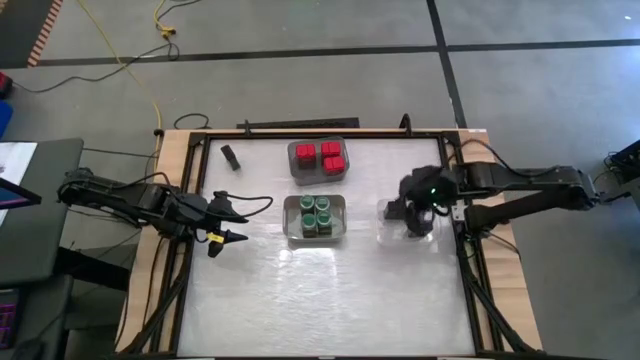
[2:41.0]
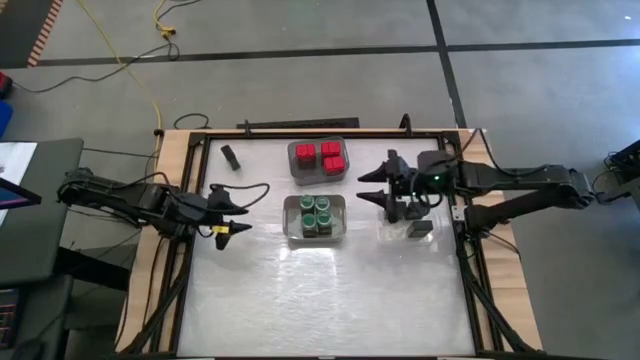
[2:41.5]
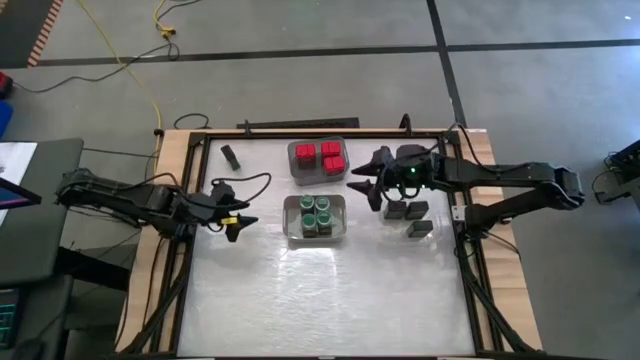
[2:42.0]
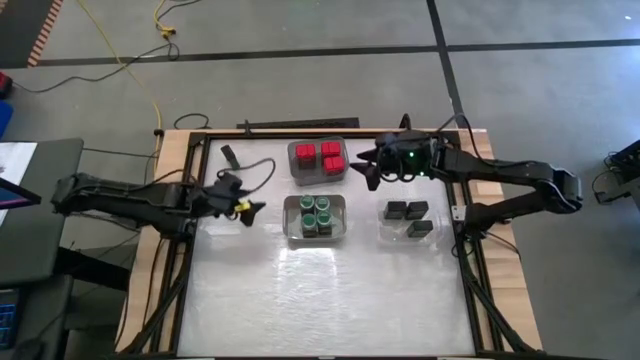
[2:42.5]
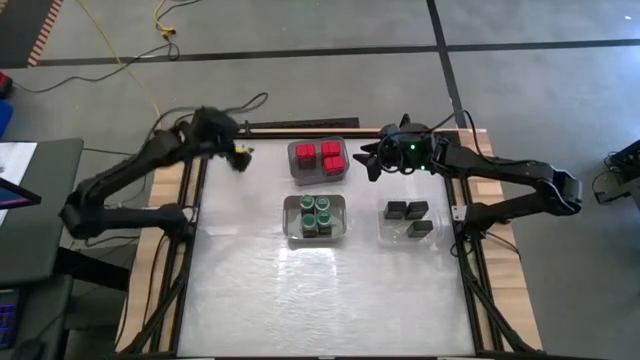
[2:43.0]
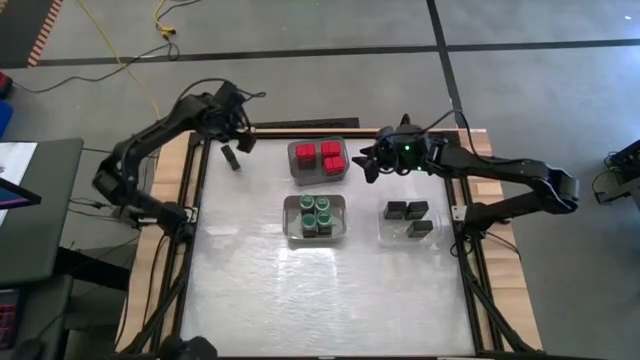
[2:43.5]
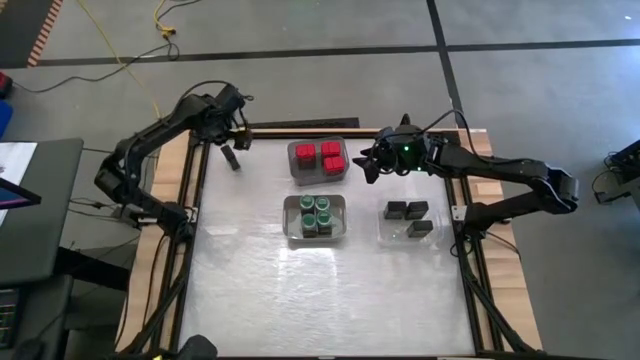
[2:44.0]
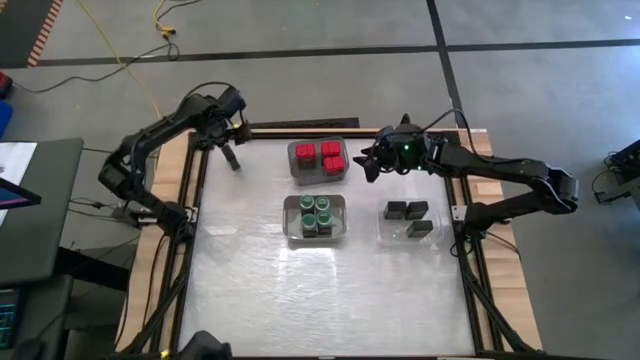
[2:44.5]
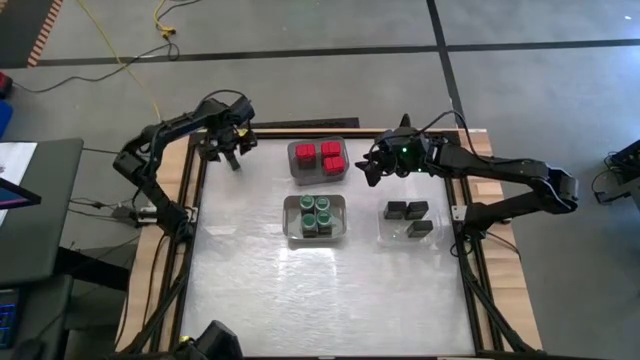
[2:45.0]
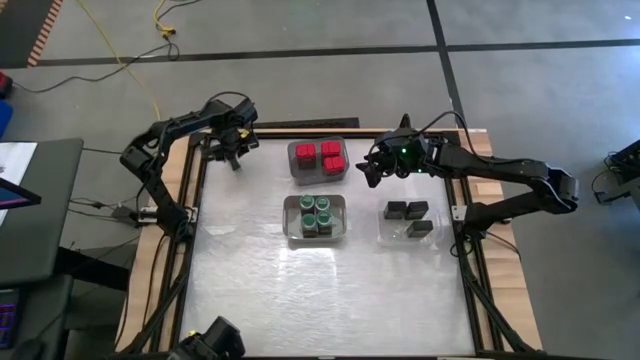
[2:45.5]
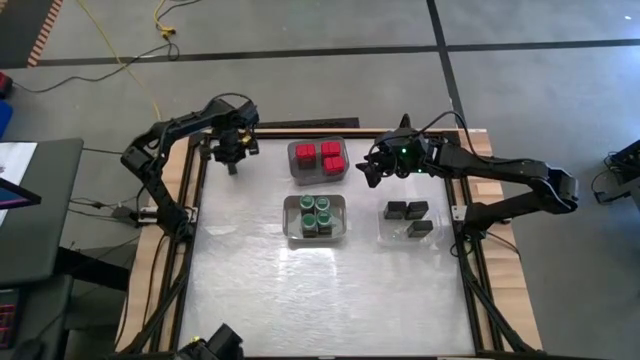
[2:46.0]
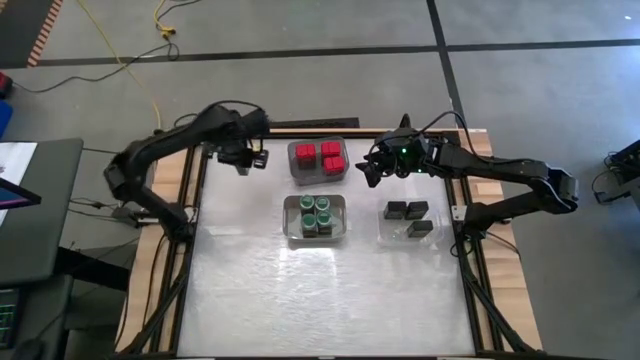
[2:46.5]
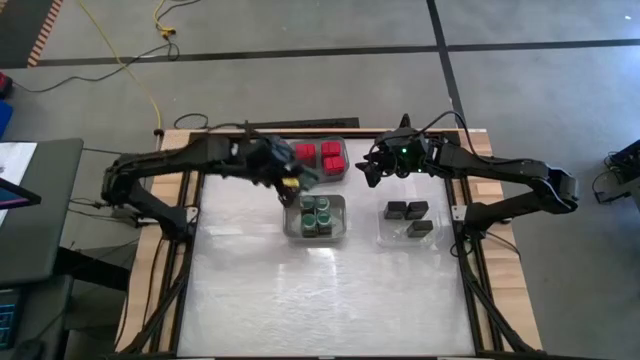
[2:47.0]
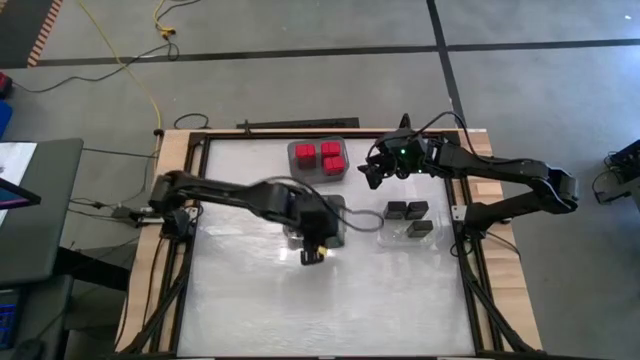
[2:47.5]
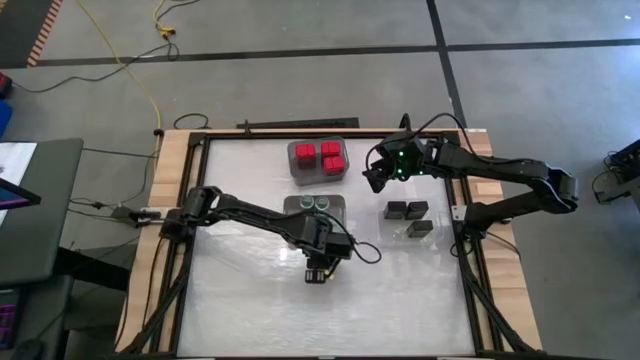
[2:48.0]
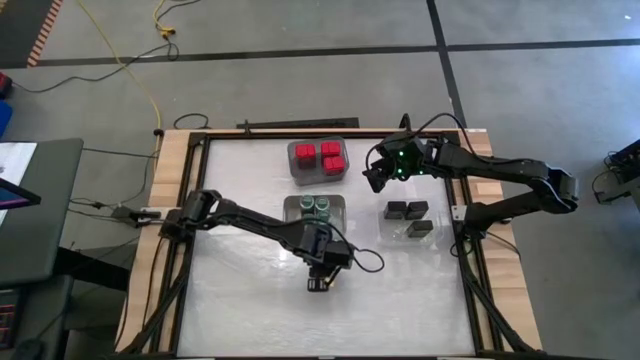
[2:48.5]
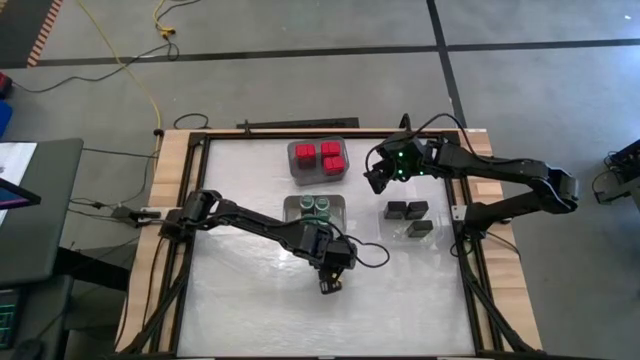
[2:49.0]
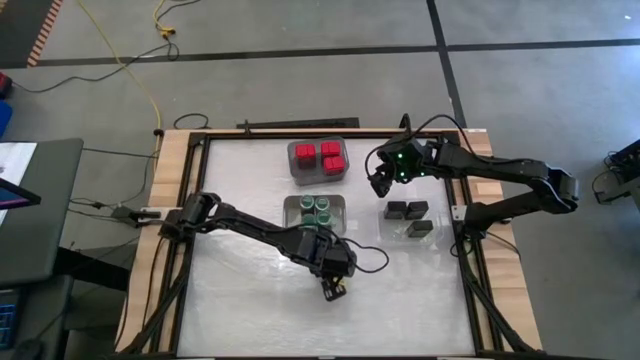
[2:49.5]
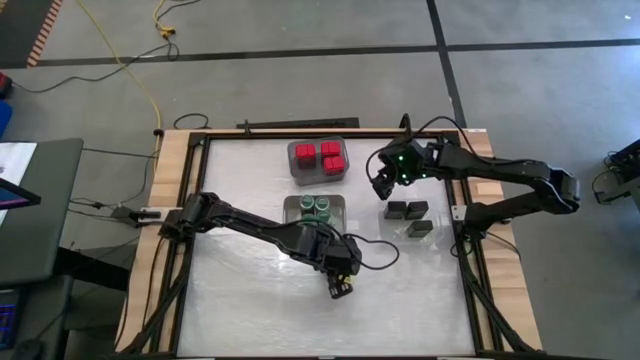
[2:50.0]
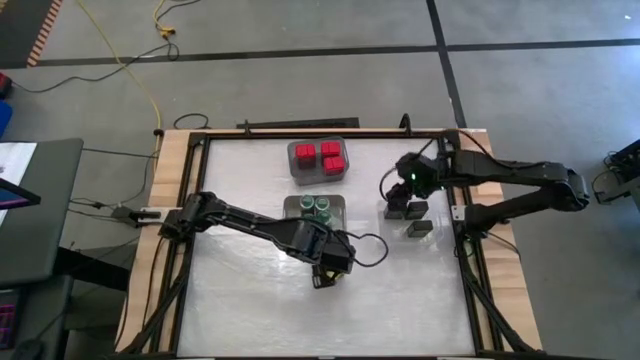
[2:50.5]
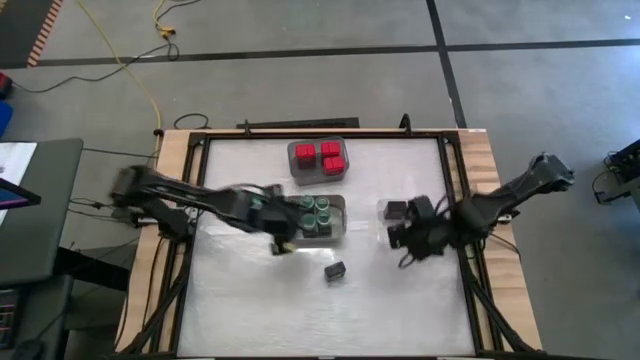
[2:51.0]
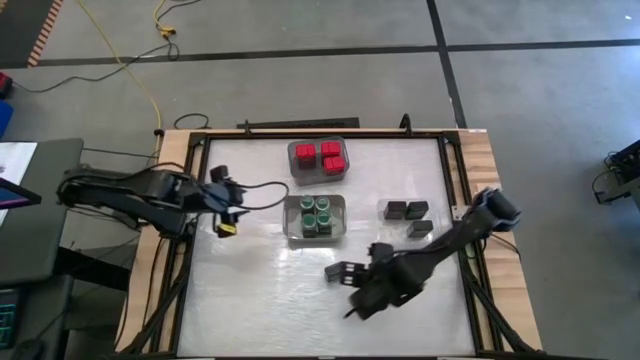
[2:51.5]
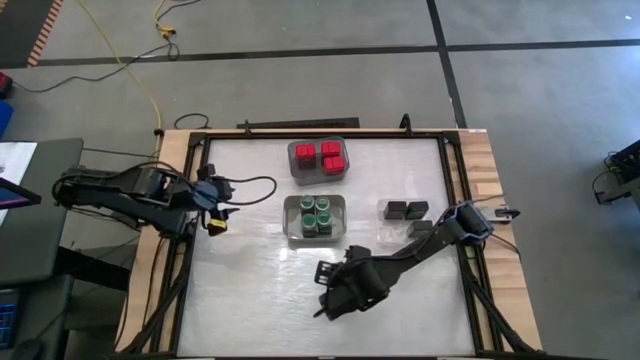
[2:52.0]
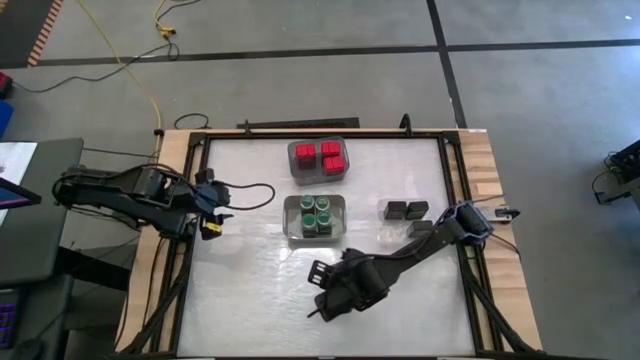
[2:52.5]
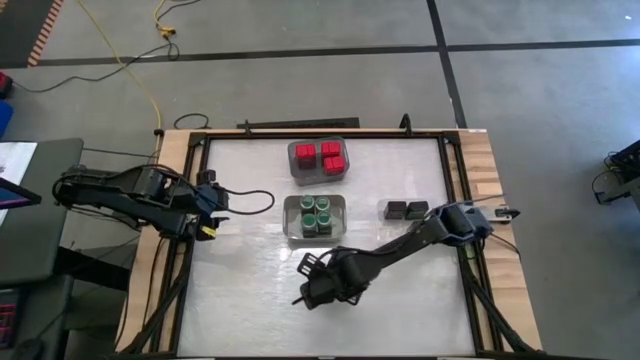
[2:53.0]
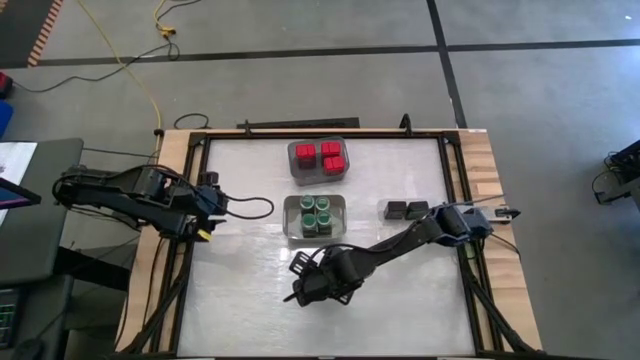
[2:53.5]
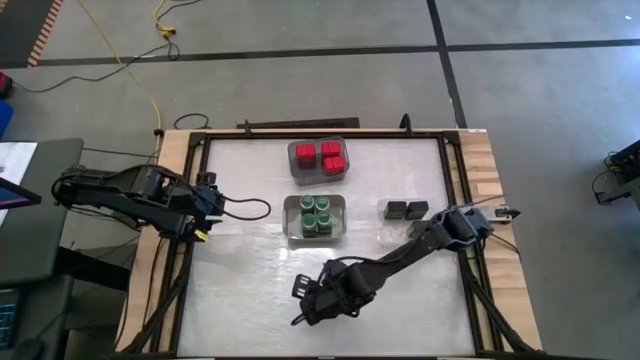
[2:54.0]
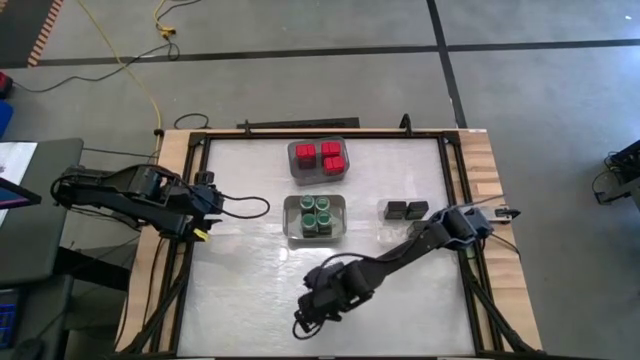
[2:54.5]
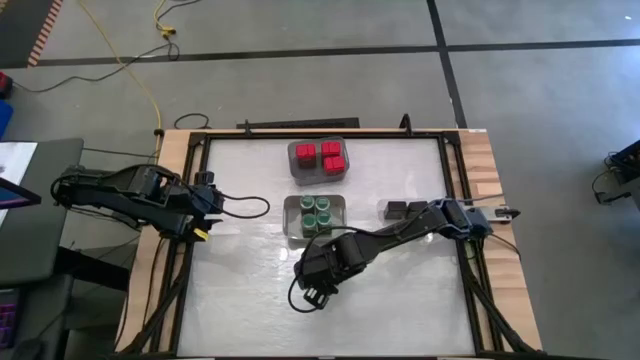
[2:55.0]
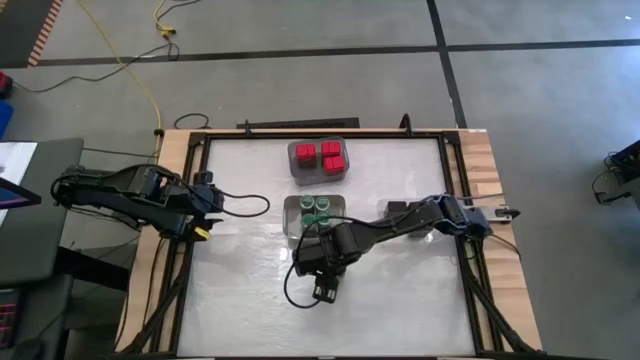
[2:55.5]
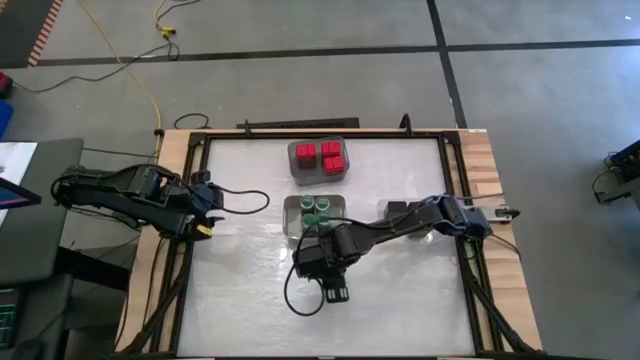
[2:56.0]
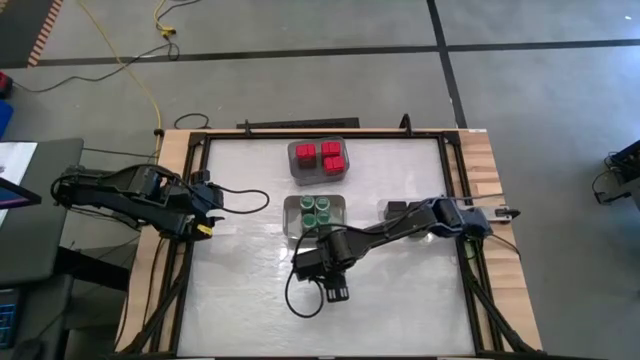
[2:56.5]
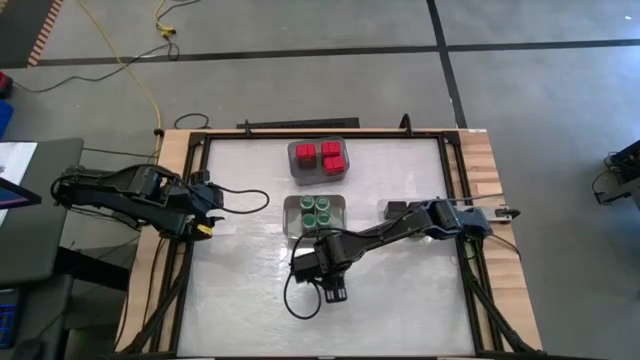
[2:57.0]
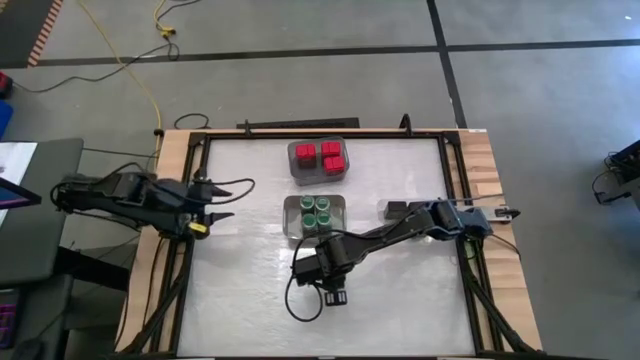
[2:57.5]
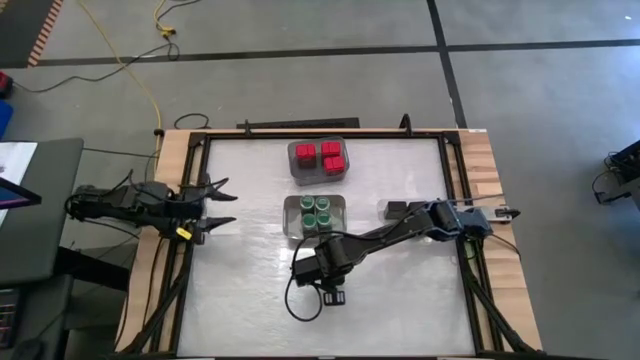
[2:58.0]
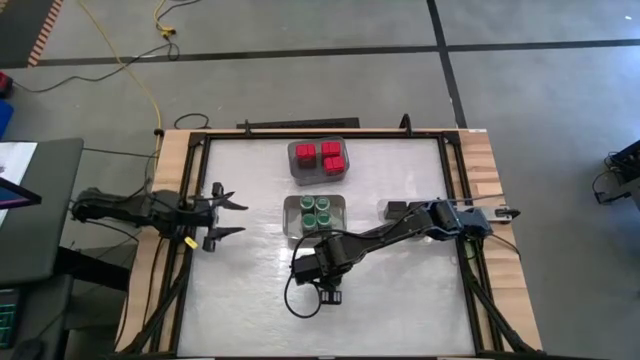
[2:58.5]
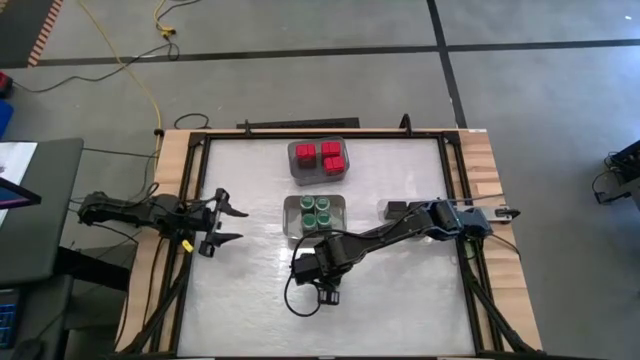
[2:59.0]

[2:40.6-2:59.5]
Task: Sort spices by type
Put the black spice can into the transparent bin
